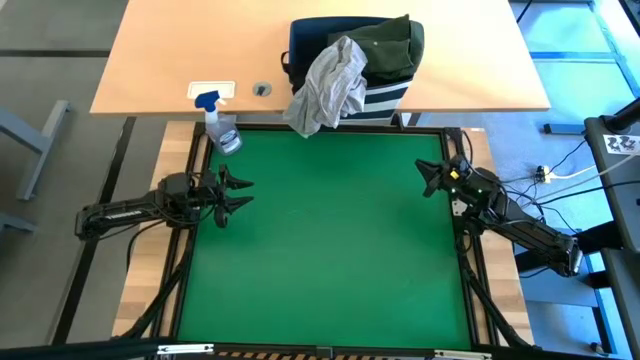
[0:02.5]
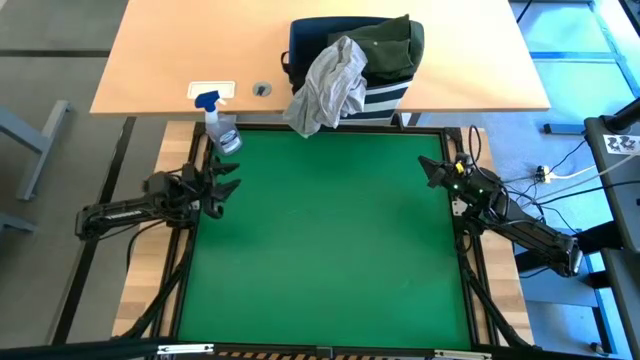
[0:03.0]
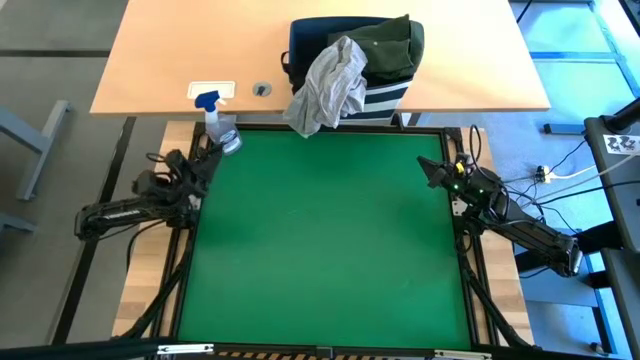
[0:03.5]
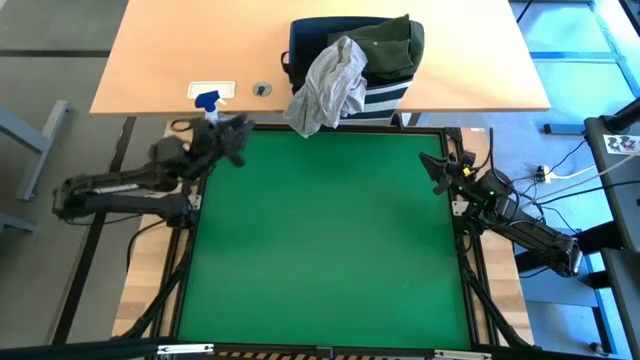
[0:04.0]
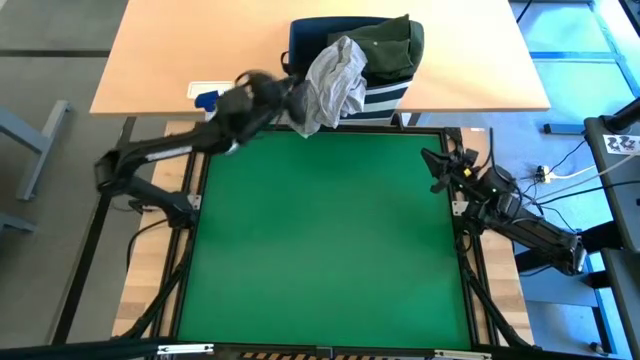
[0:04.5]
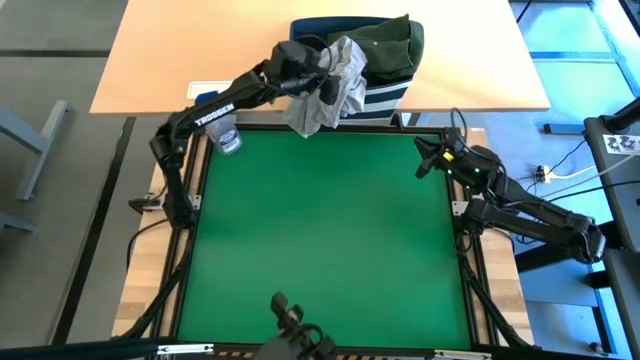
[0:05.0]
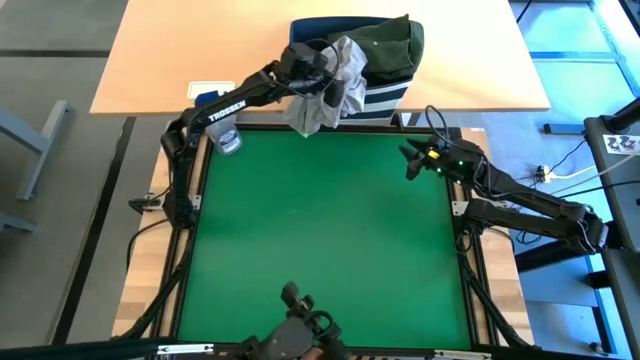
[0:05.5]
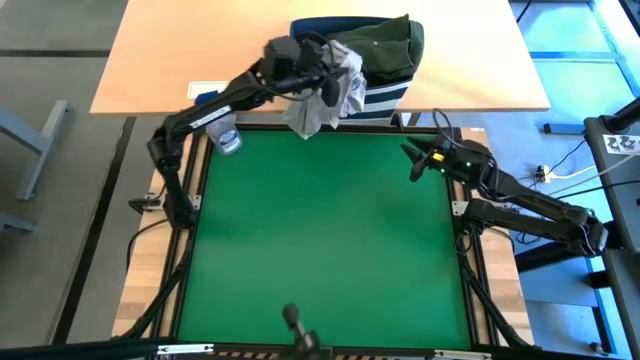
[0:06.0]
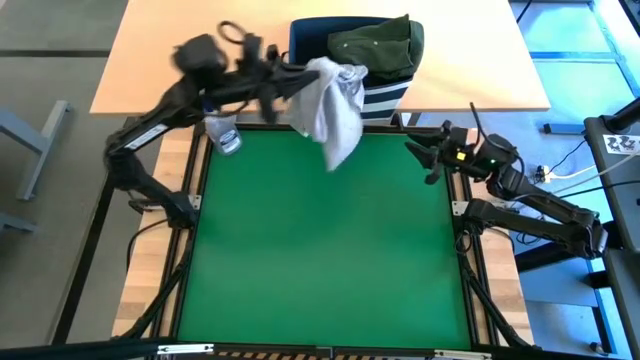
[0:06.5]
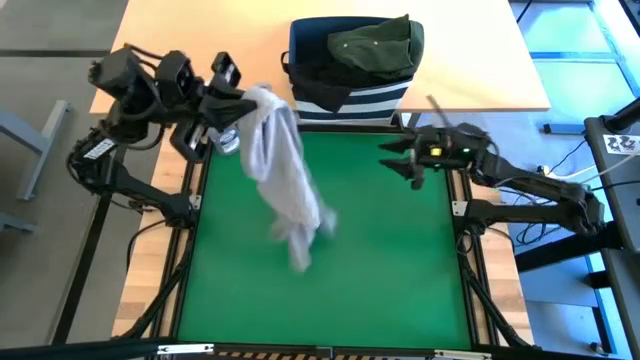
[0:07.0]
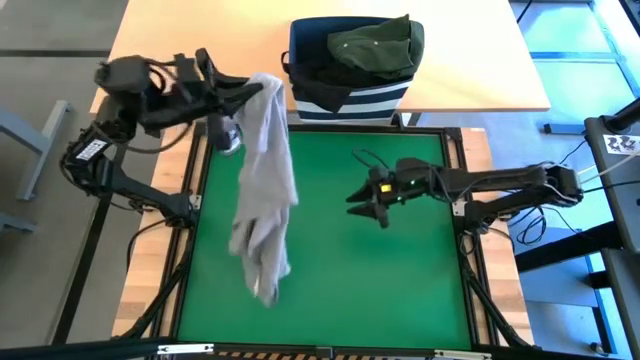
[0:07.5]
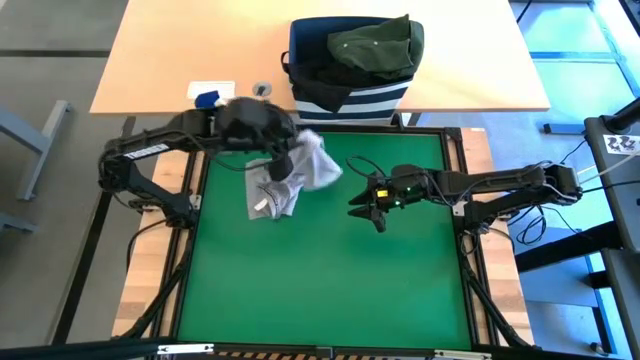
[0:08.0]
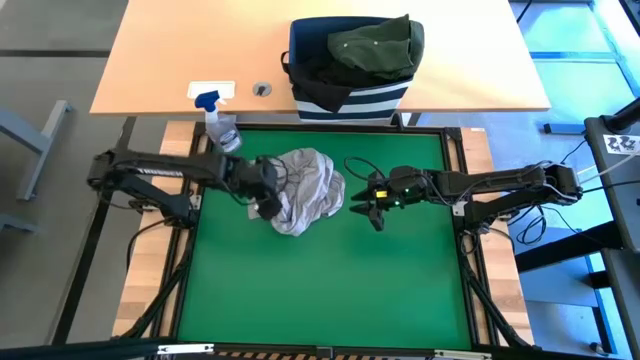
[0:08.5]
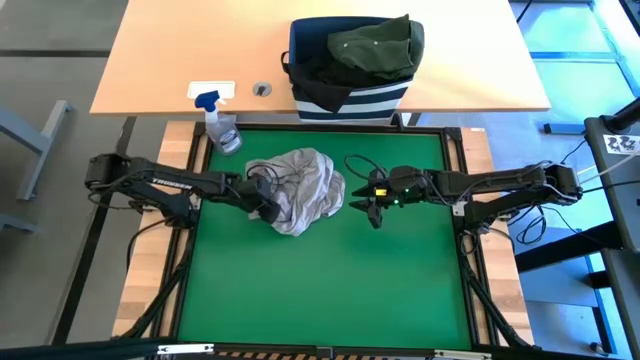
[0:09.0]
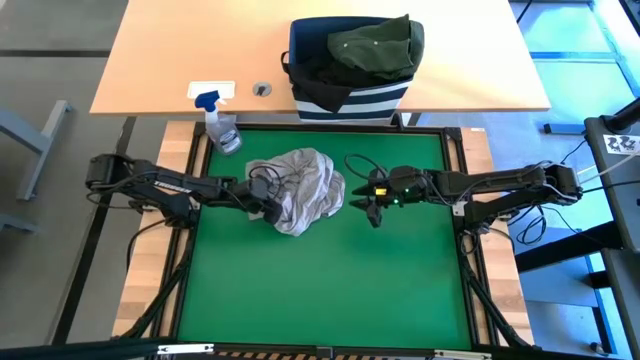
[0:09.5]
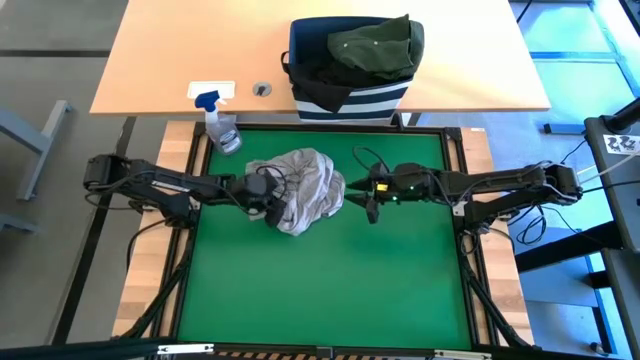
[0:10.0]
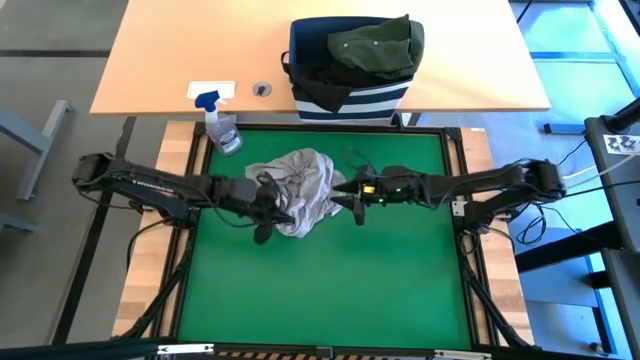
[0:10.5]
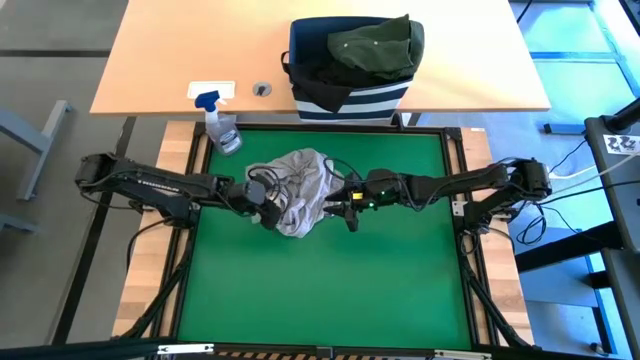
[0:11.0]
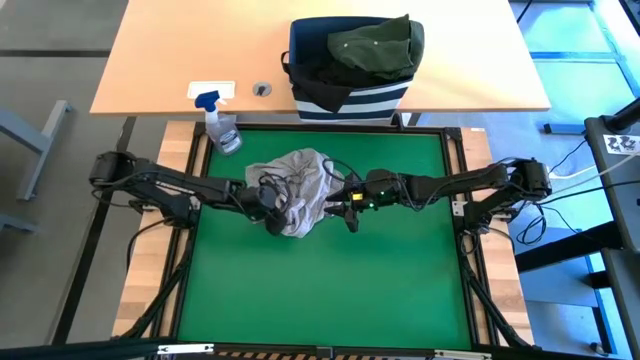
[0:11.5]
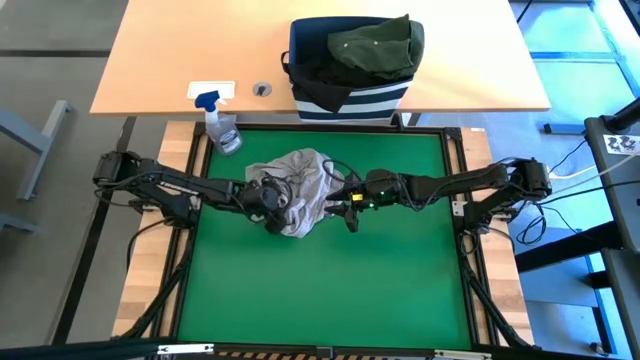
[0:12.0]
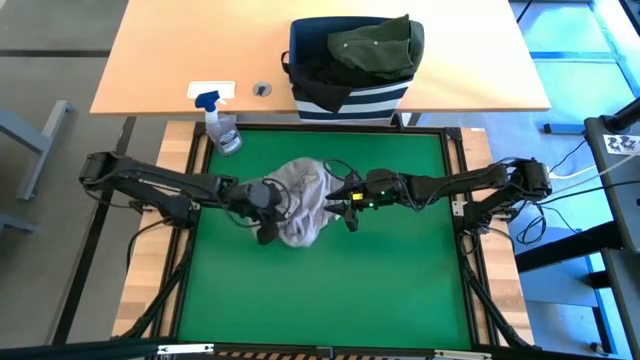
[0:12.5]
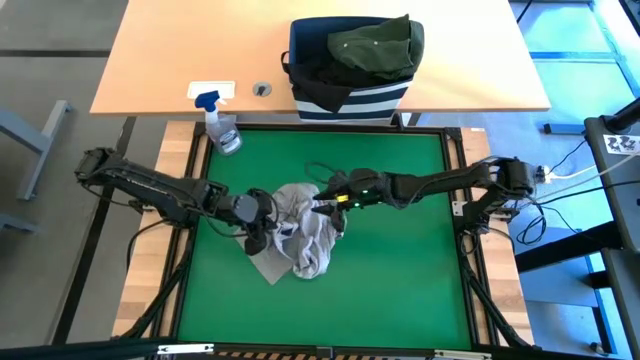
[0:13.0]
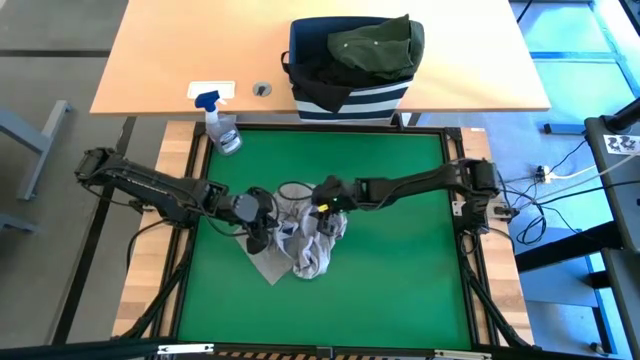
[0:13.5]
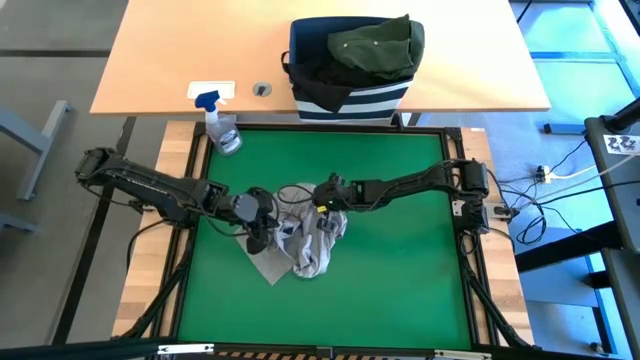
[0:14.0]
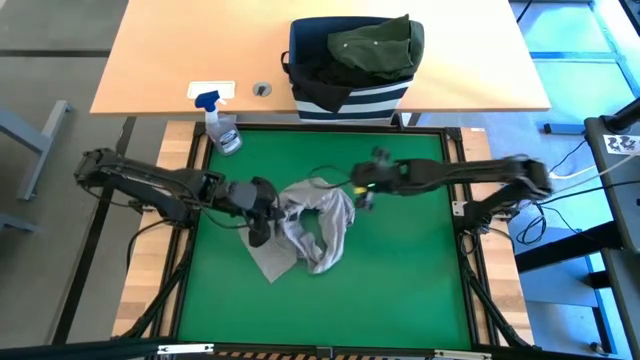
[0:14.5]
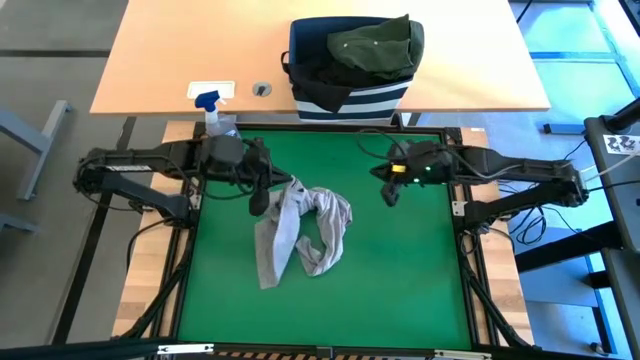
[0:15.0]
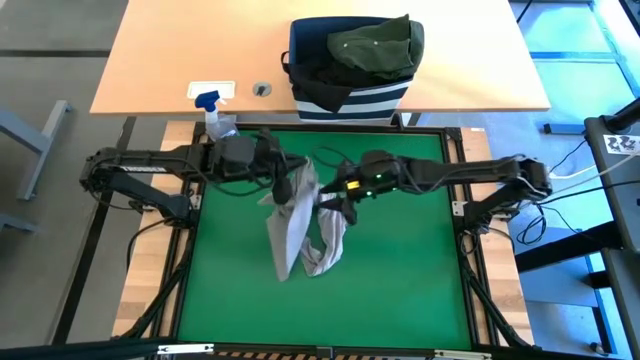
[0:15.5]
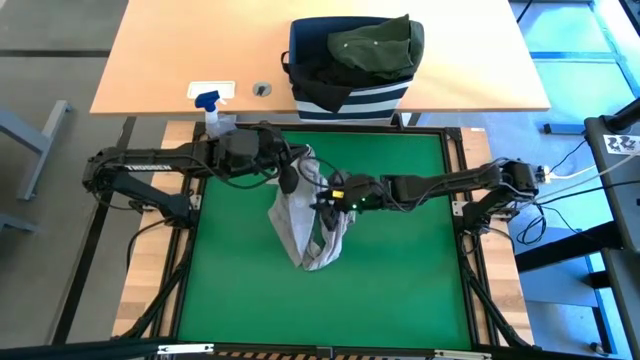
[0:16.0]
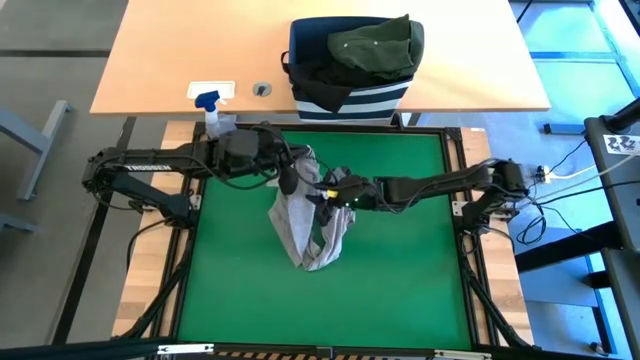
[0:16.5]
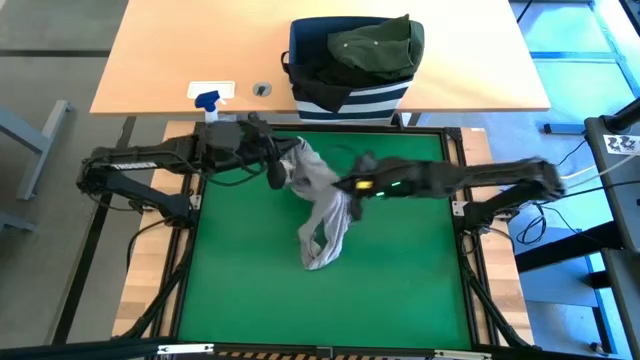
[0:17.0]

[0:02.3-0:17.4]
Task: Fold Laundry from Bin
Fold the gray shirt

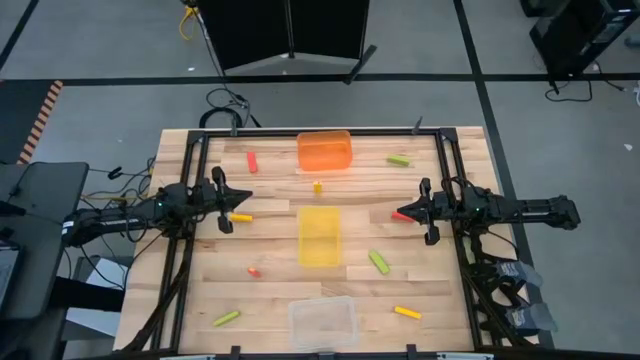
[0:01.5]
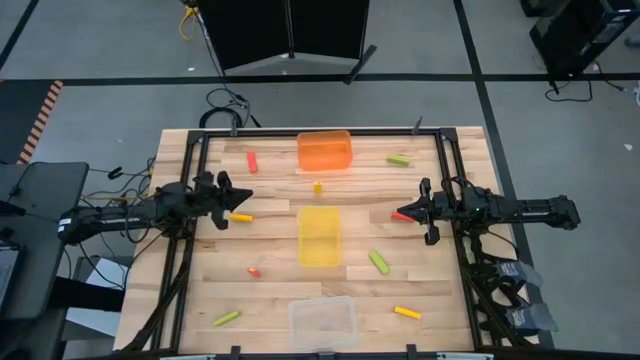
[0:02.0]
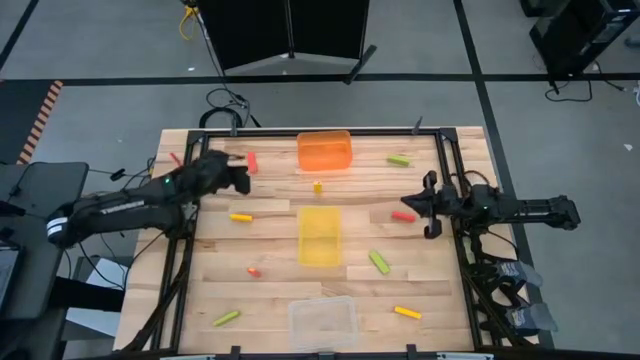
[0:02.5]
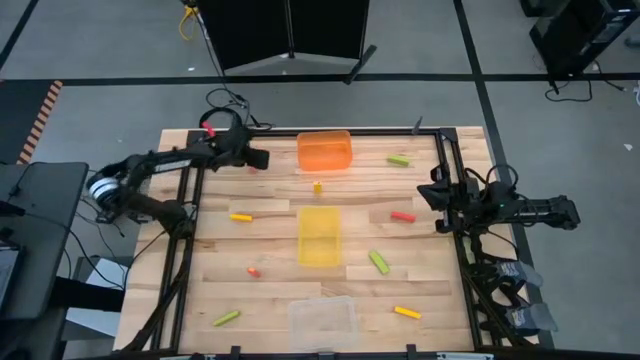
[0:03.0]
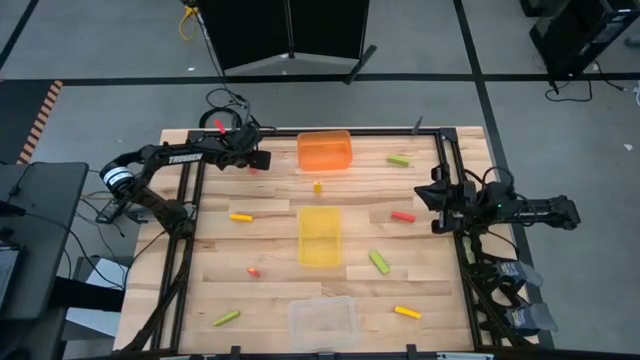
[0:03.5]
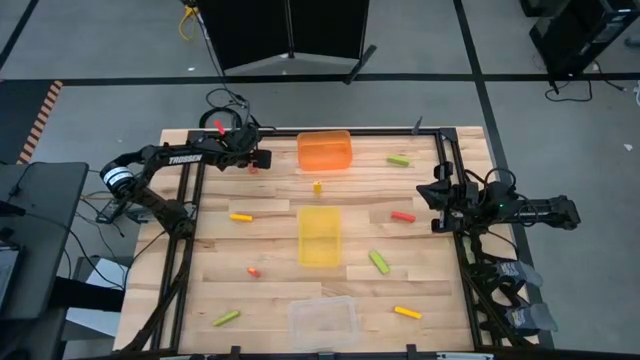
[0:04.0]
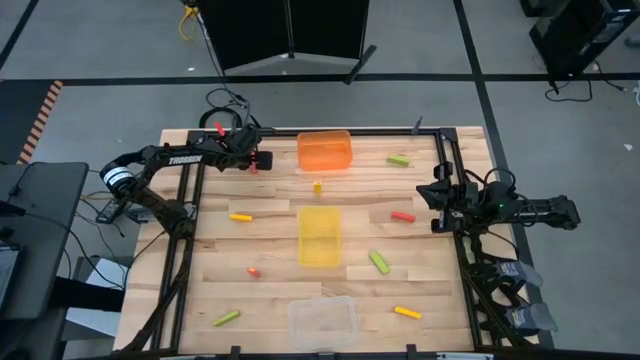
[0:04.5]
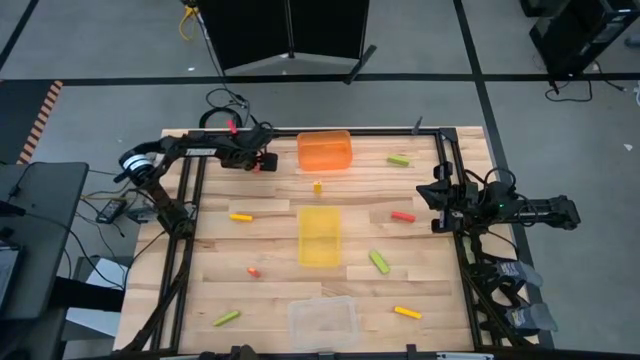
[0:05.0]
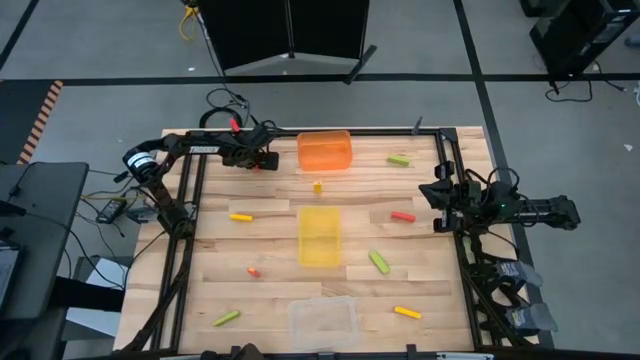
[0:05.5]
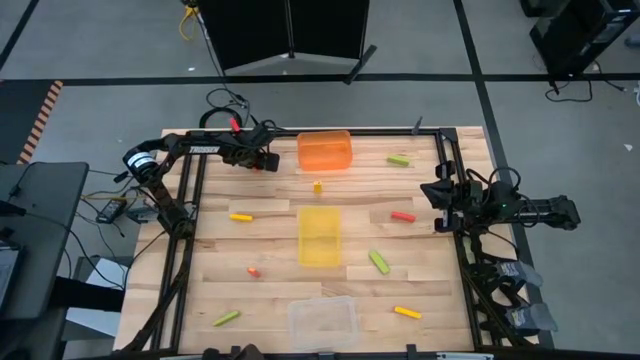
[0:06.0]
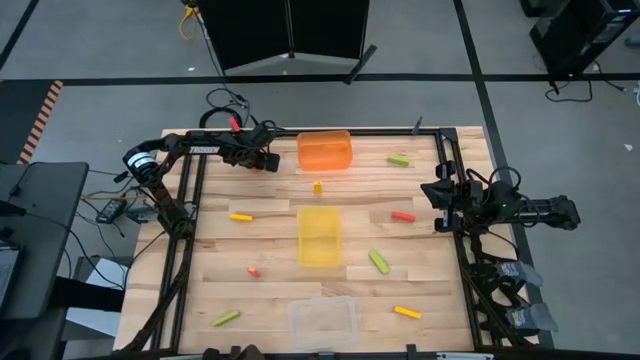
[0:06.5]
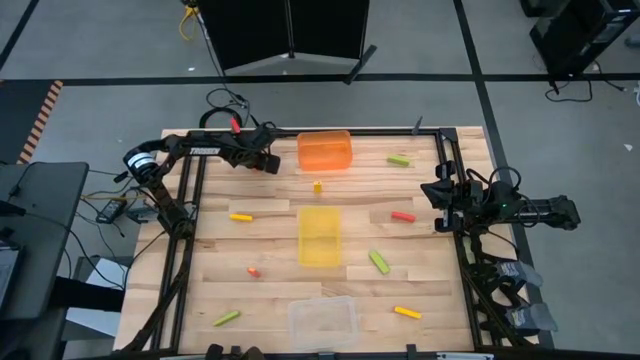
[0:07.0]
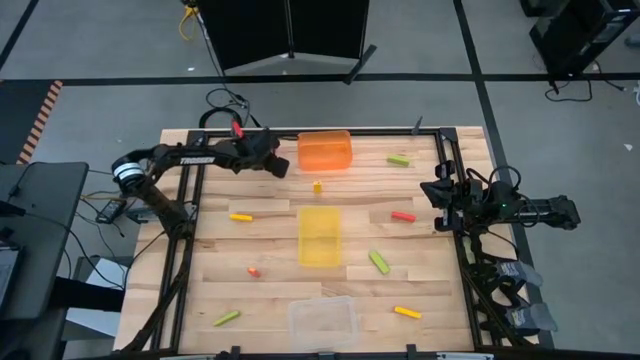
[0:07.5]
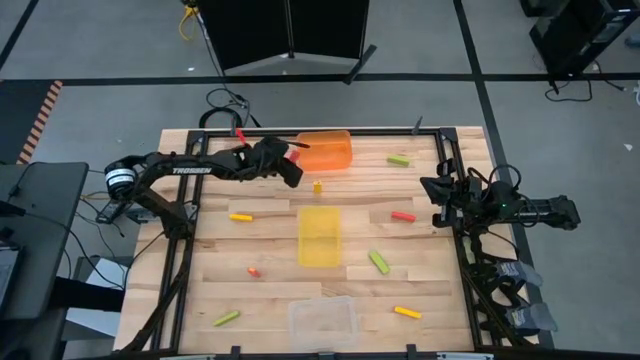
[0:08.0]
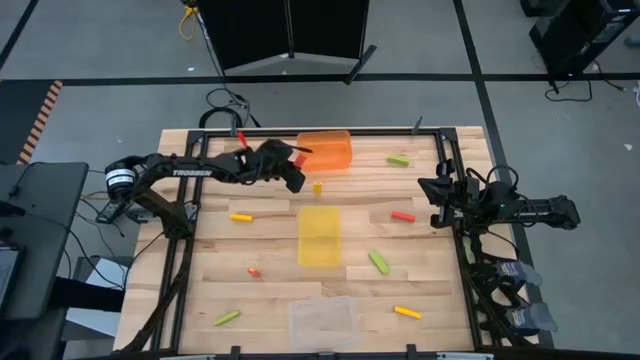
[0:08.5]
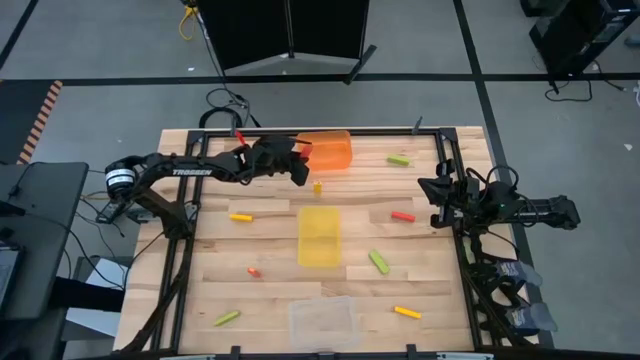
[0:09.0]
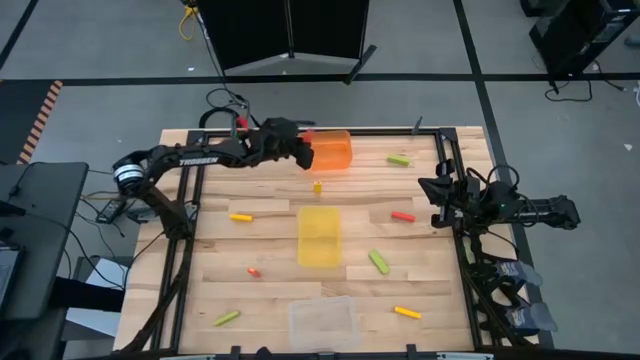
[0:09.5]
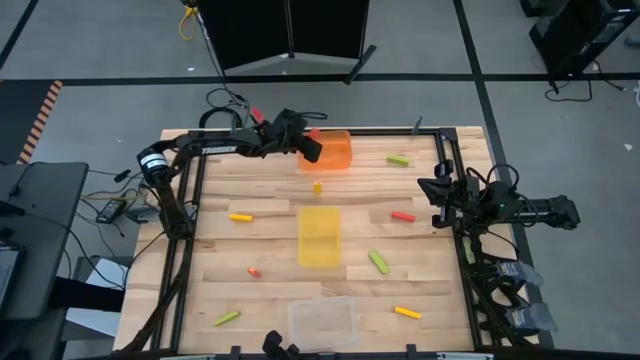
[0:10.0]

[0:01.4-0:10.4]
Task: Sort blocks
Put the top orange block into the orange bin
